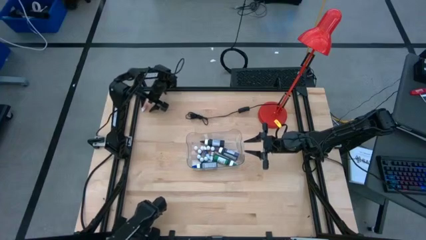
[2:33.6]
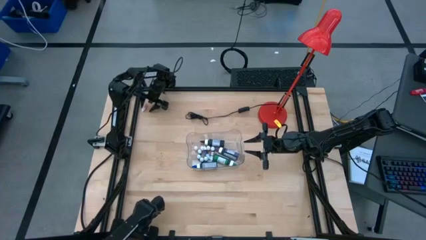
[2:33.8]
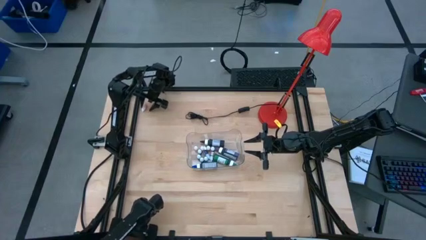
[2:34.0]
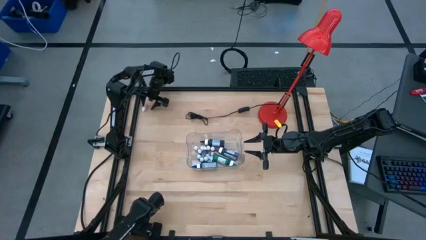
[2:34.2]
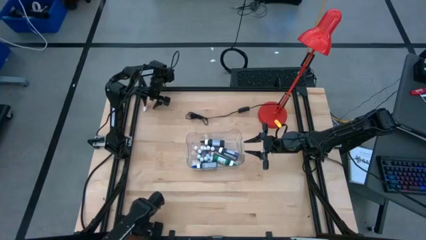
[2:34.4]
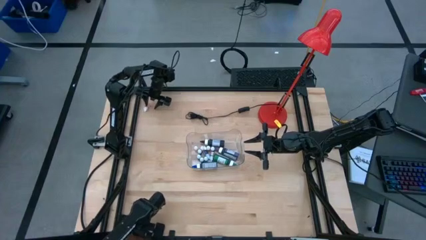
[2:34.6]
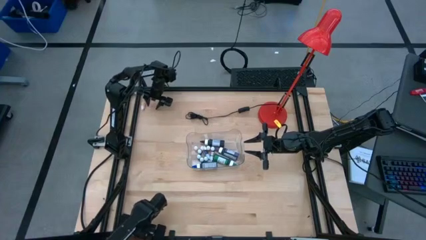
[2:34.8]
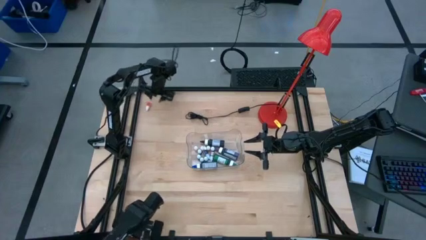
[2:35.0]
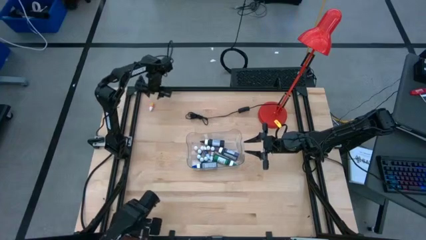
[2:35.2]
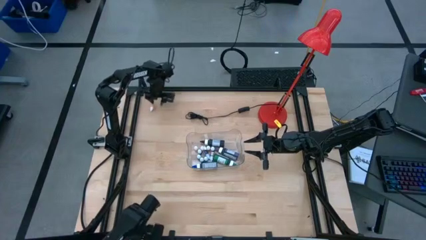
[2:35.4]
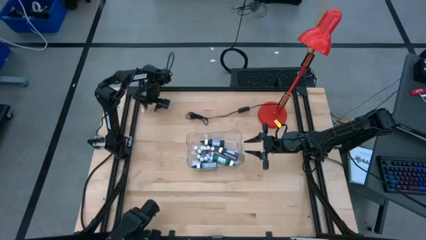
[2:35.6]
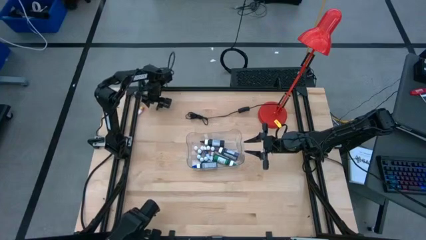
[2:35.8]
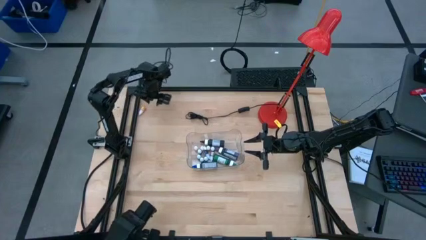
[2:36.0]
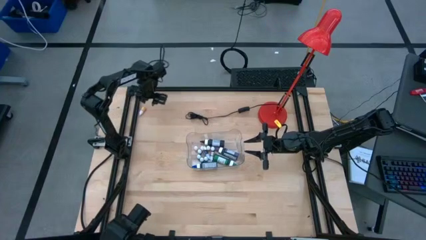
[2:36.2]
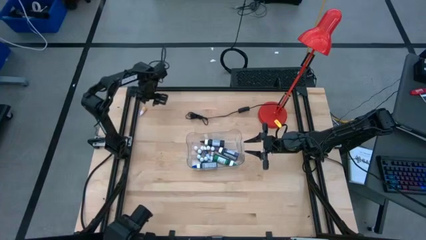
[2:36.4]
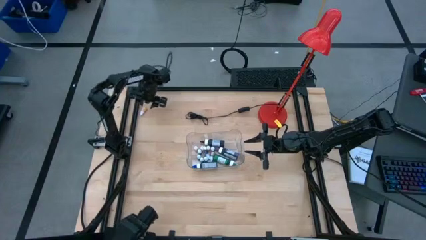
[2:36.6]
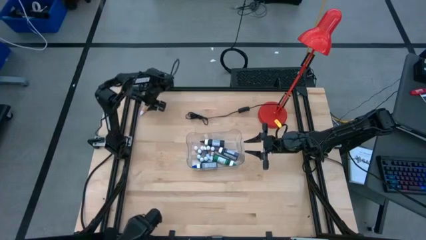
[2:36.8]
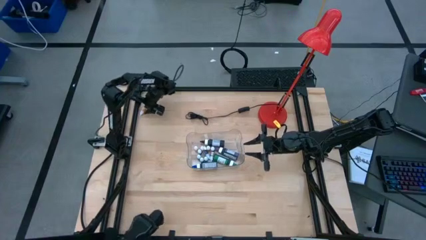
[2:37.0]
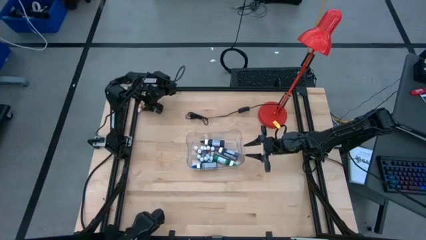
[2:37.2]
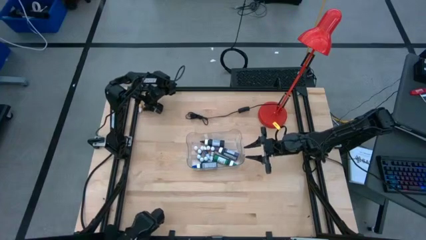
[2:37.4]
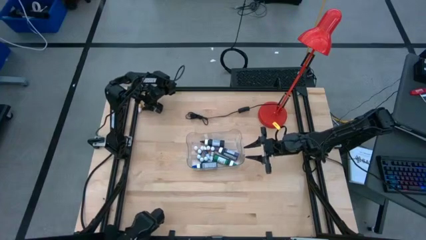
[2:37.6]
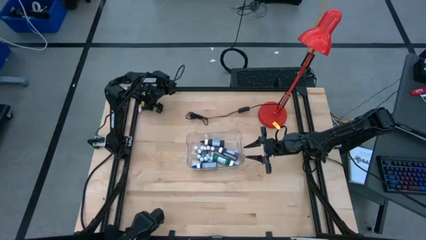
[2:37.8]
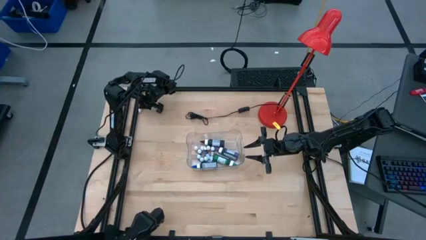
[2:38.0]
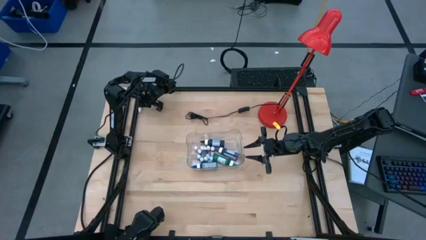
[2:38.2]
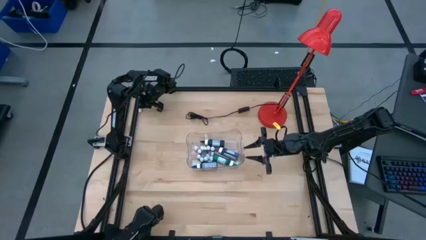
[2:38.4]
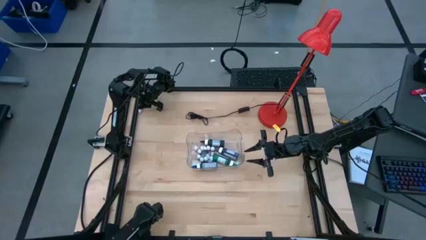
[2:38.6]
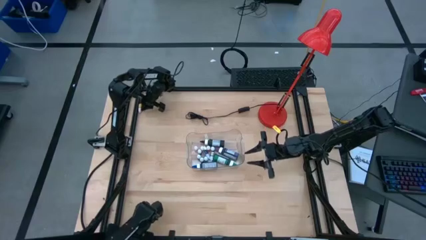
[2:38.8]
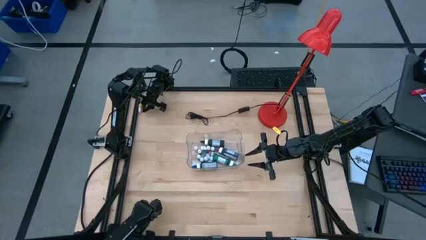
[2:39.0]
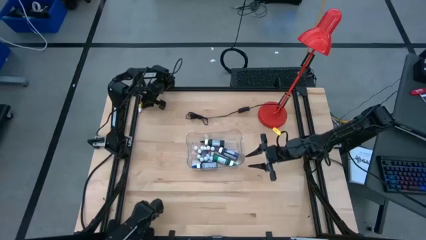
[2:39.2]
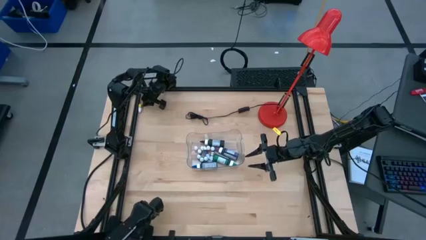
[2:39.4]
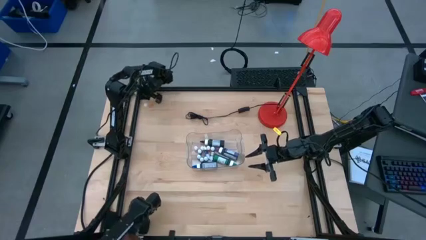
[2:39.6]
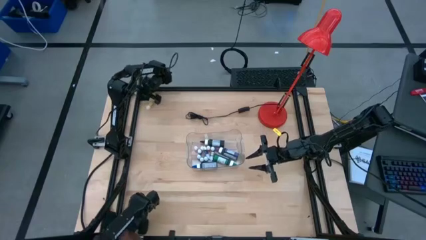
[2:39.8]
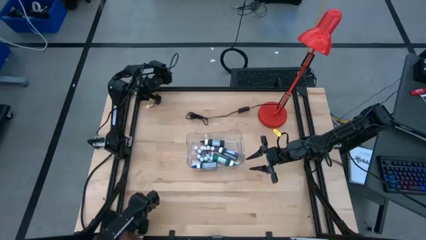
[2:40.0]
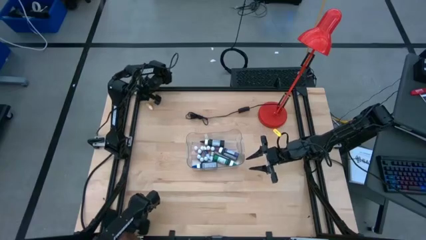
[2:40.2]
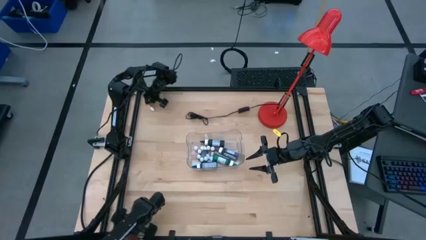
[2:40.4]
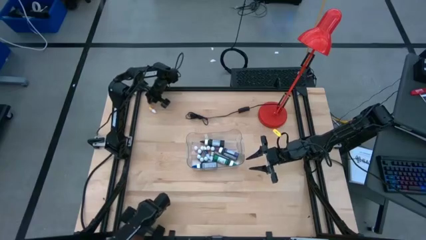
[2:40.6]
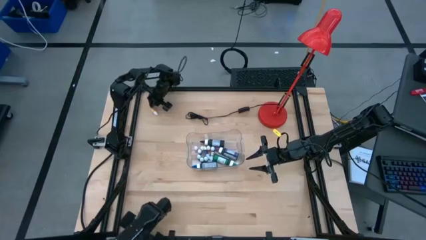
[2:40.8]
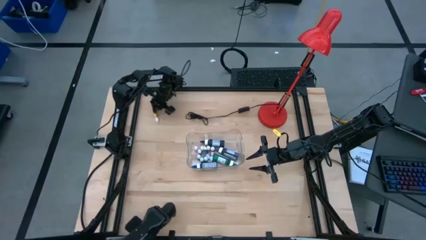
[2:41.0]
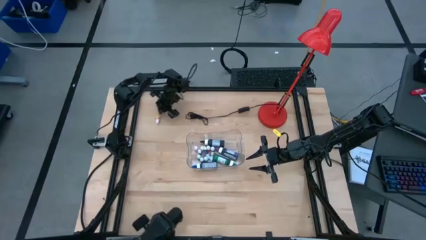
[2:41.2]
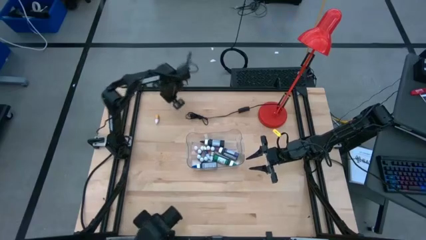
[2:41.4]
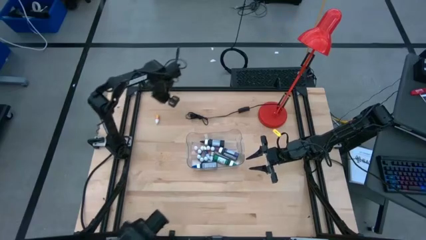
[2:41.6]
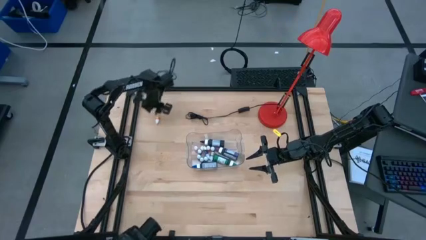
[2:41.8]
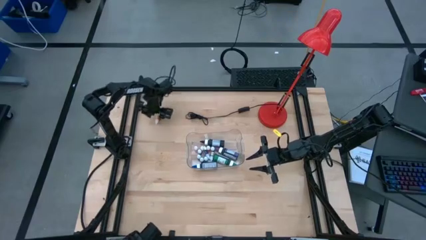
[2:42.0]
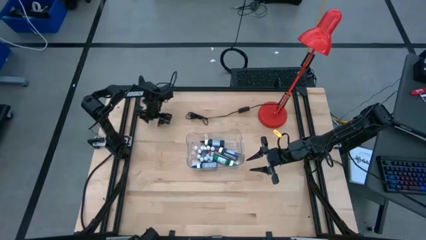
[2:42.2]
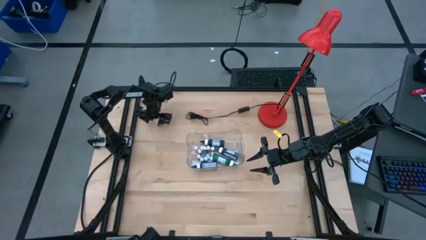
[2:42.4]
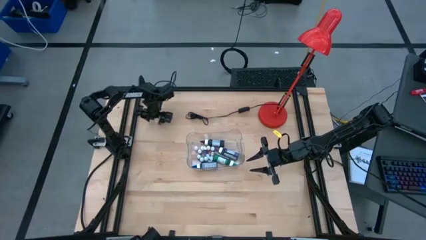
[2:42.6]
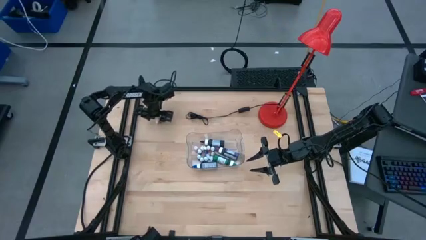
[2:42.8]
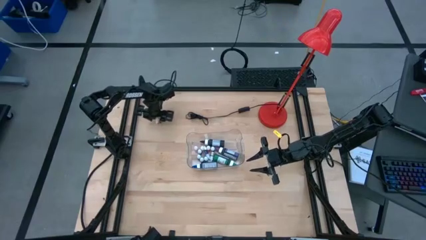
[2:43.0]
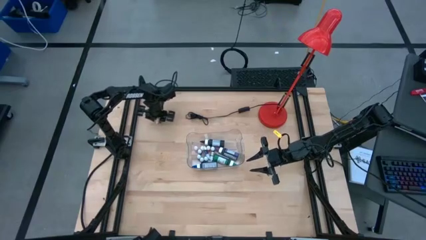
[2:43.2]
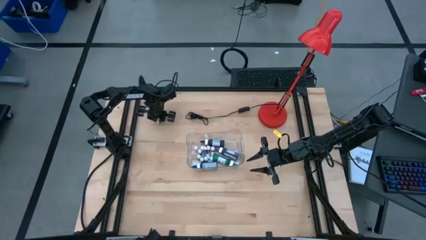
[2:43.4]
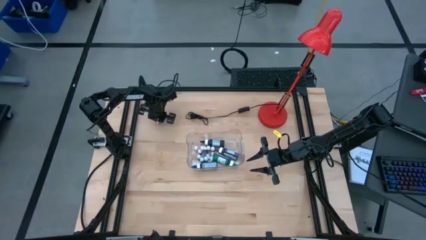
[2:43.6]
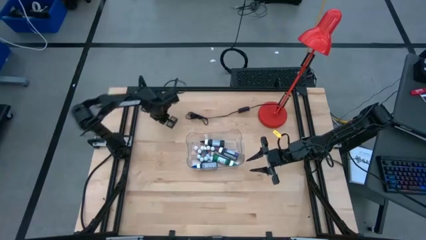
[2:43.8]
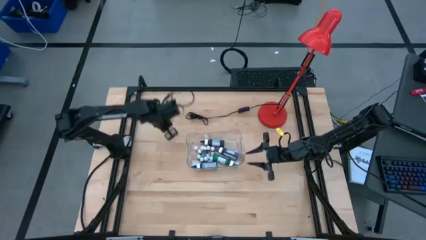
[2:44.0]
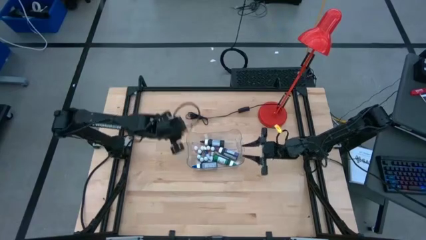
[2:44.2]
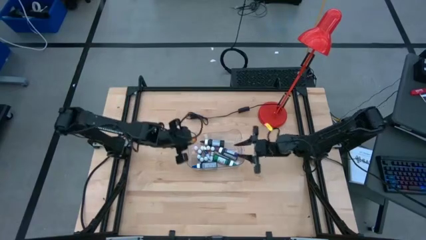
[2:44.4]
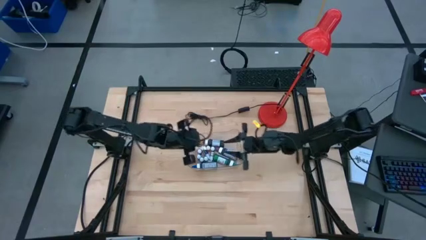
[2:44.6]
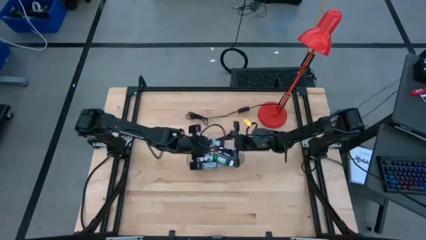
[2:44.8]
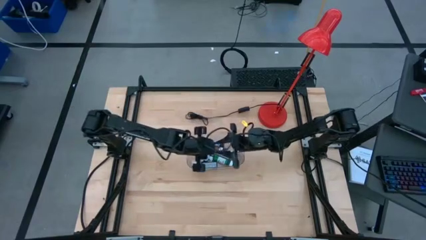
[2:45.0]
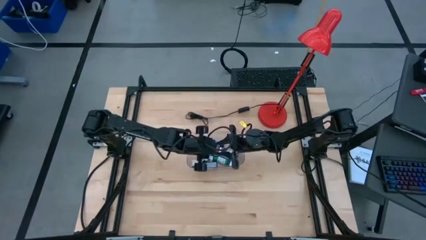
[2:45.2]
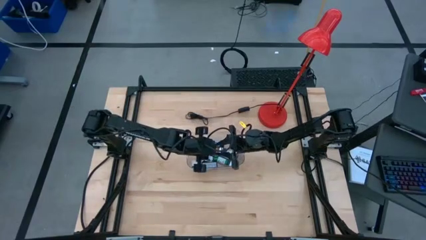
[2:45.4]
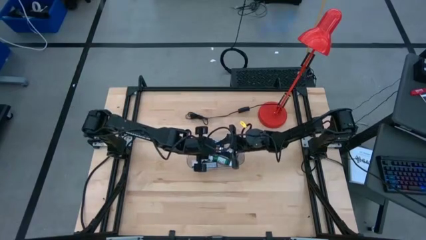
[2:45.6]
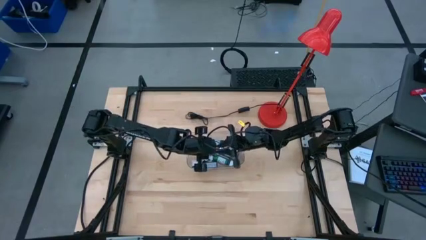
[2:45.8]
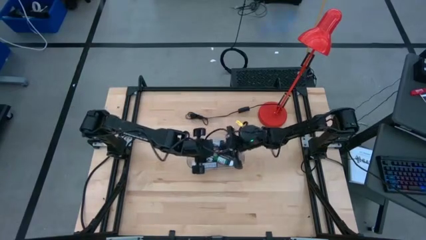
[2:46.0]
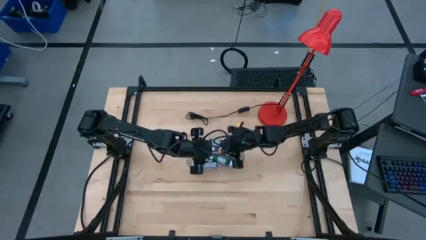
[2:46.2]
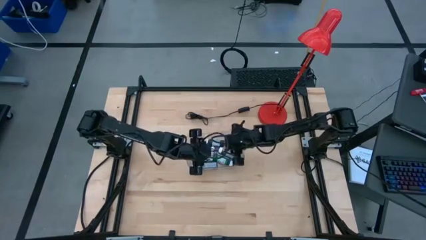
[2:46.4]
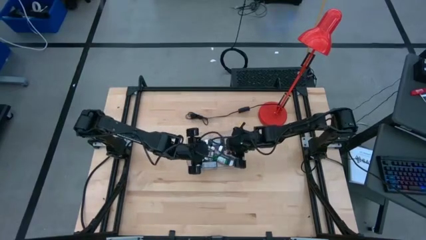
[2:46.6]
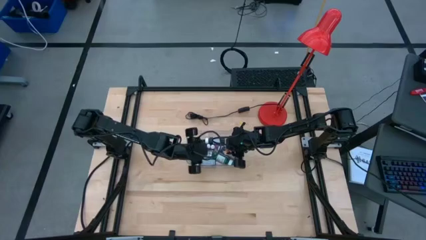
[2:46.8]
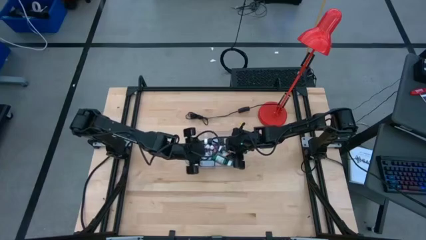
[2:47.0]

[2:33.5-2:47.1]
Task: Pick & Place food coloring
Put the small orange food coloring bottle into the transparent bin

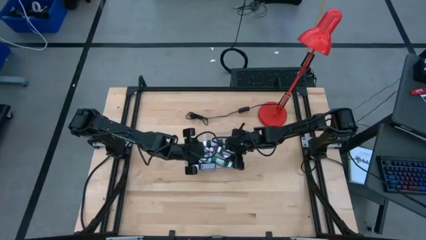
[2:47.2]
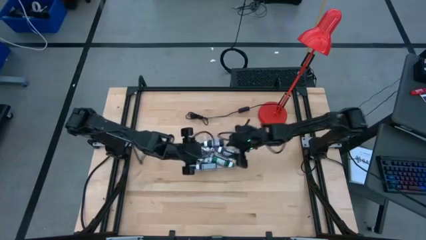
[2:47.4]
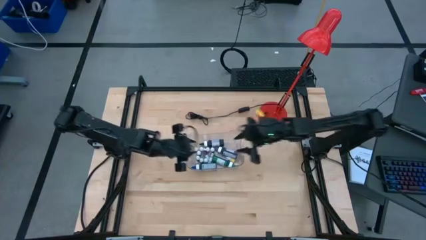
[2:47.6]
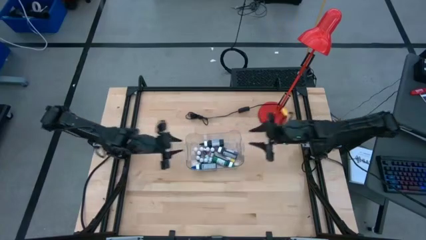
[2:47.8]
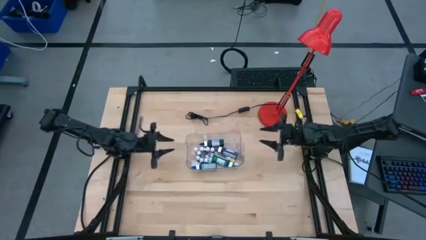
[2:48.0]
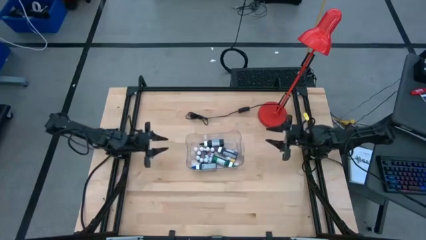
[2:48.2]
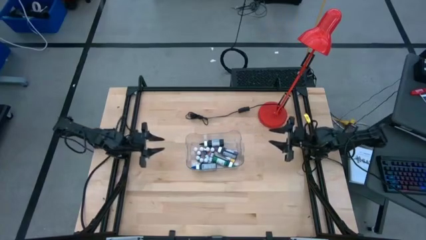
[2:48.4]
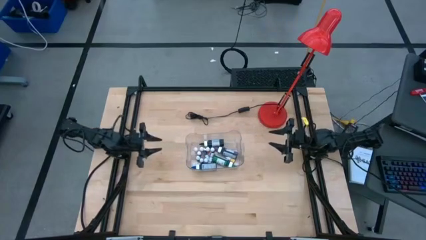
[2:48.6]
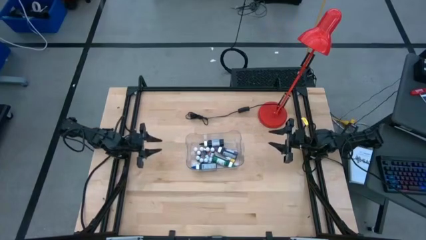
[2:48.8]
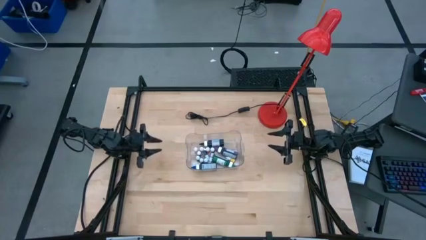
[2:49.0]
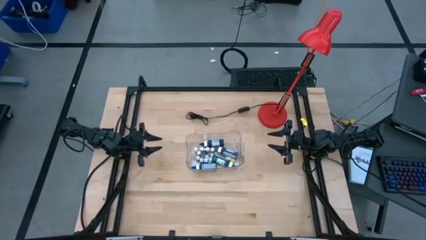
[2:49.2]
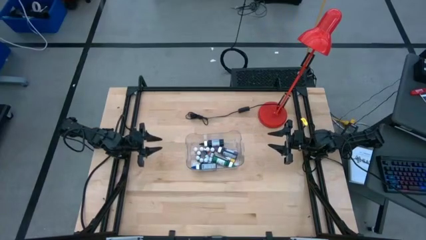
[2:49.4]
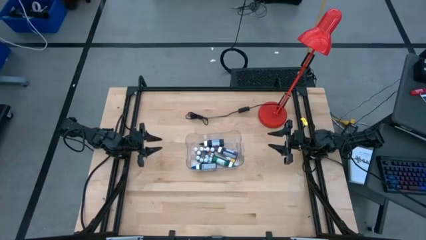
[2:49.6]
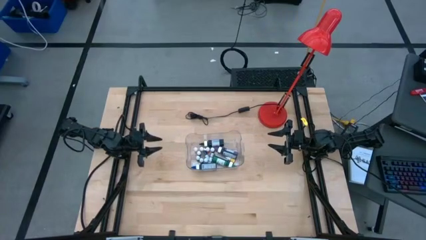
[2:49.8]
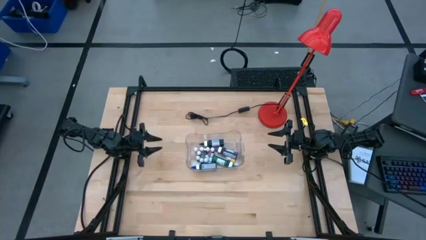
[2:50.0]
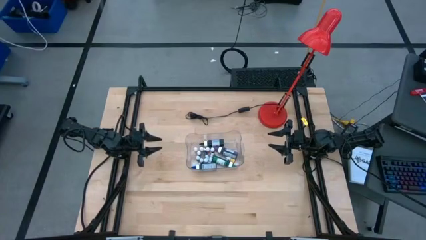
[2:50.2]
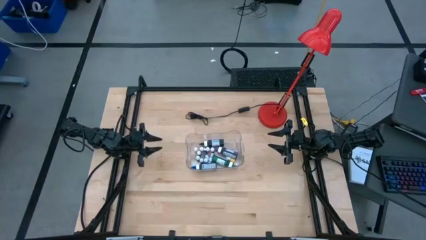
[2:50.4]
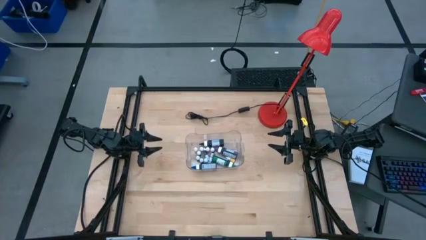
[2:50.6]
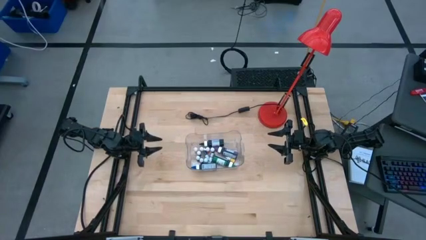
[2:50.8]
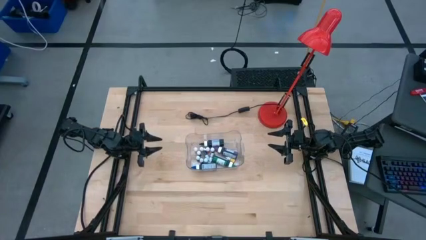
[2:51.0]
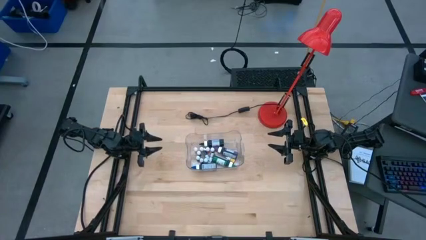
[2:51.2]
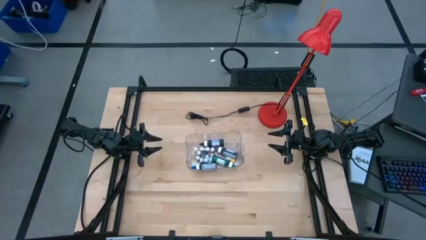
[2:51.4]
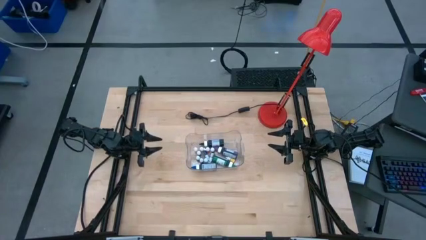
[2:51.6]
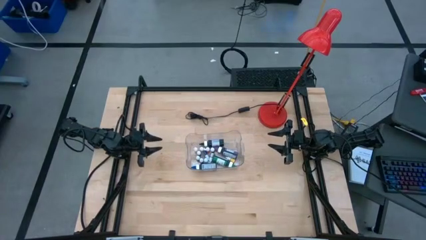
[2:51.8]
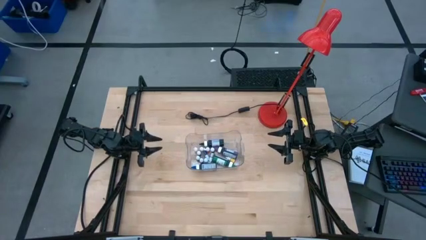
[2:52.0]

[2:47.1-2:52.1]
Return to Home Position
